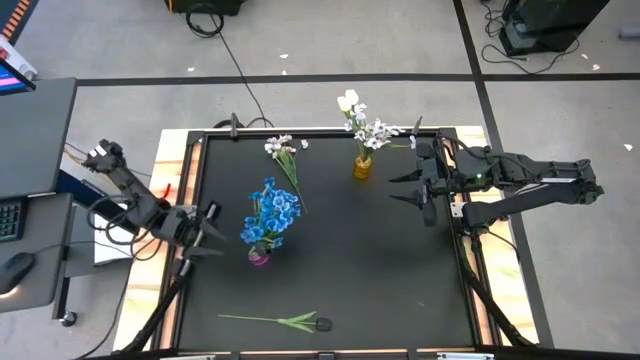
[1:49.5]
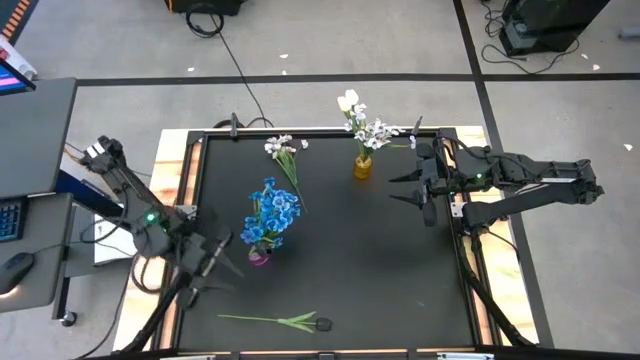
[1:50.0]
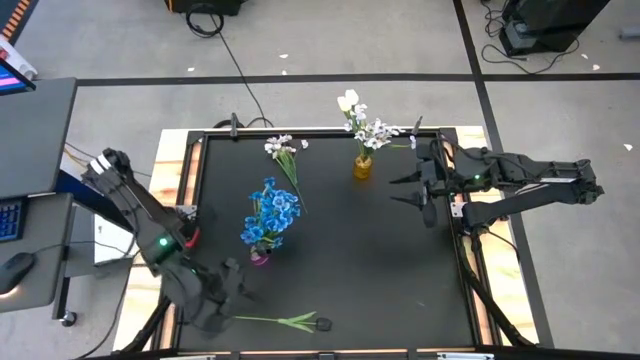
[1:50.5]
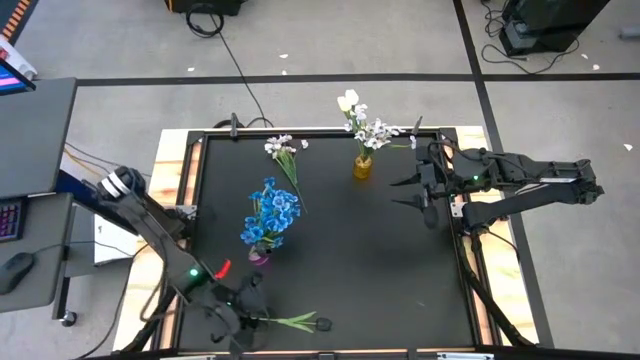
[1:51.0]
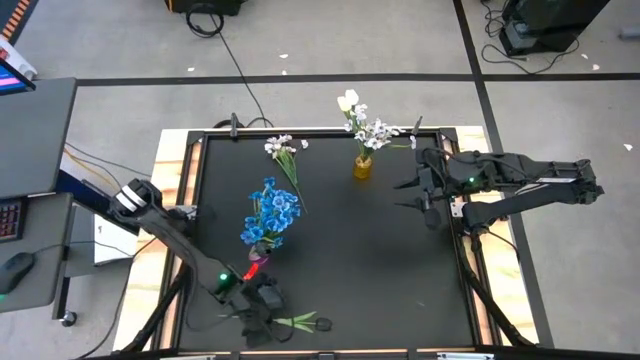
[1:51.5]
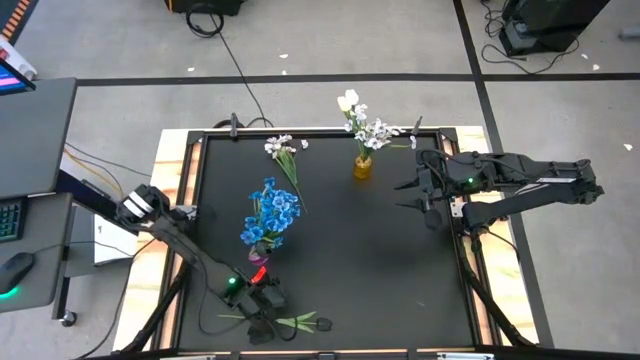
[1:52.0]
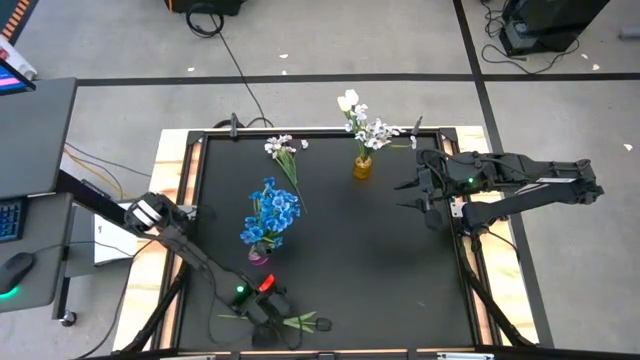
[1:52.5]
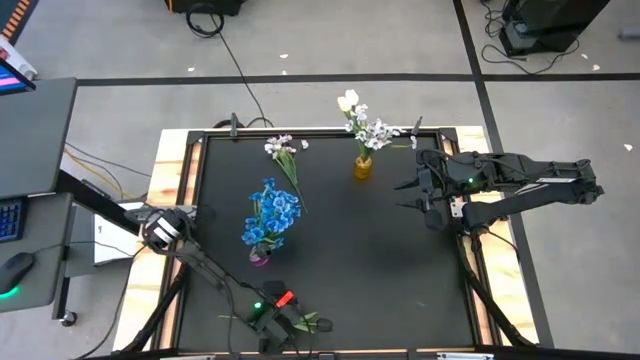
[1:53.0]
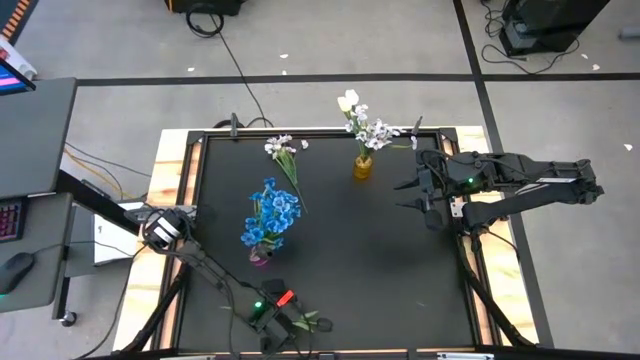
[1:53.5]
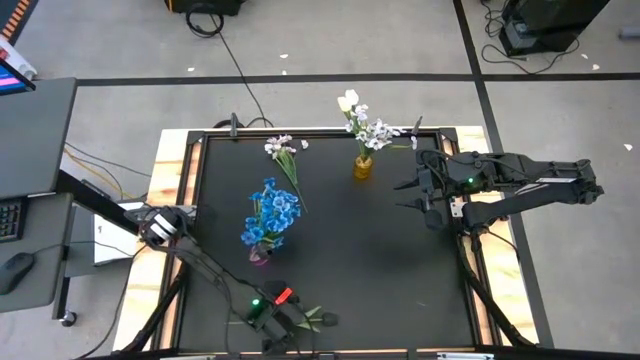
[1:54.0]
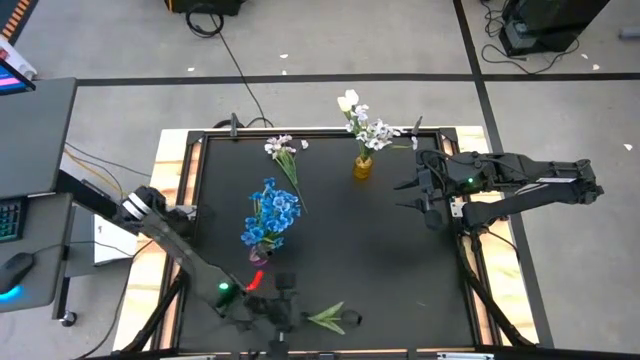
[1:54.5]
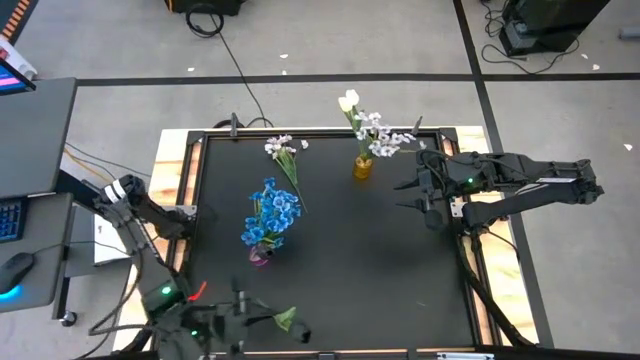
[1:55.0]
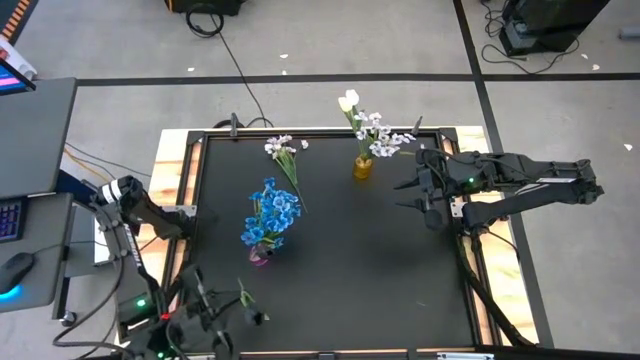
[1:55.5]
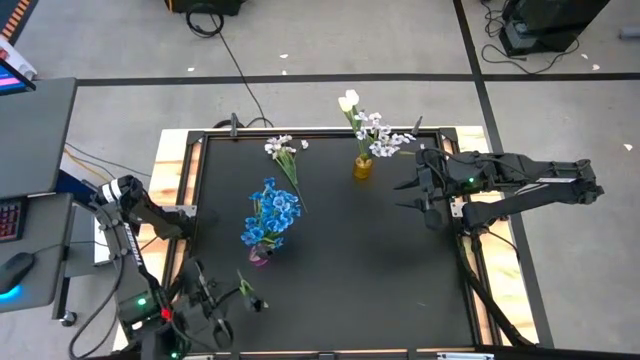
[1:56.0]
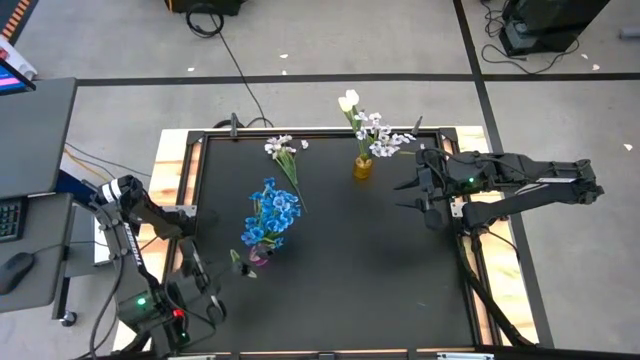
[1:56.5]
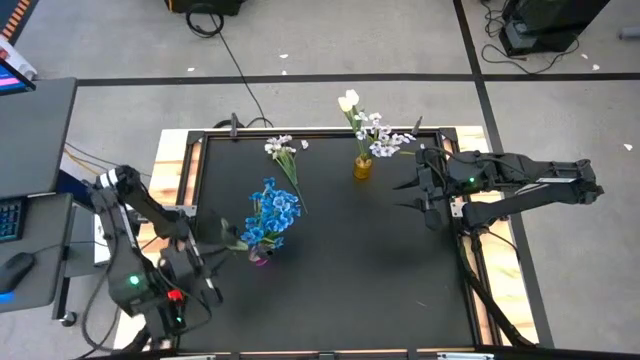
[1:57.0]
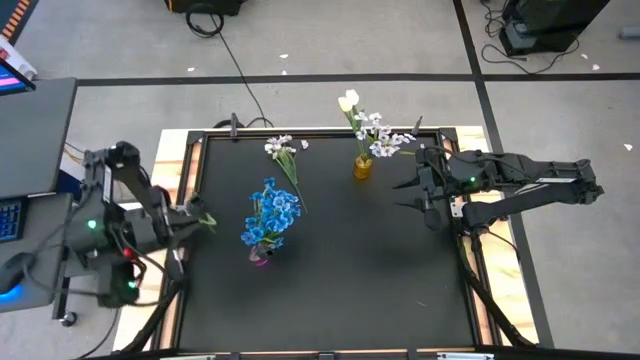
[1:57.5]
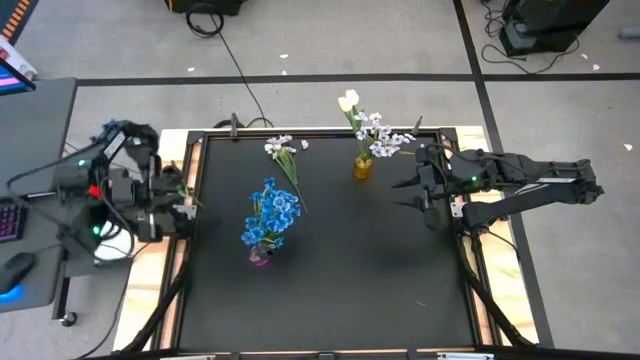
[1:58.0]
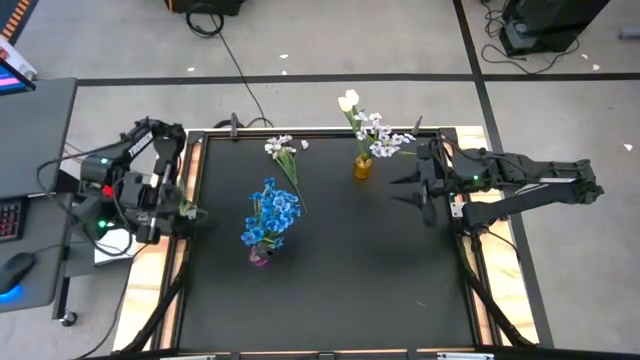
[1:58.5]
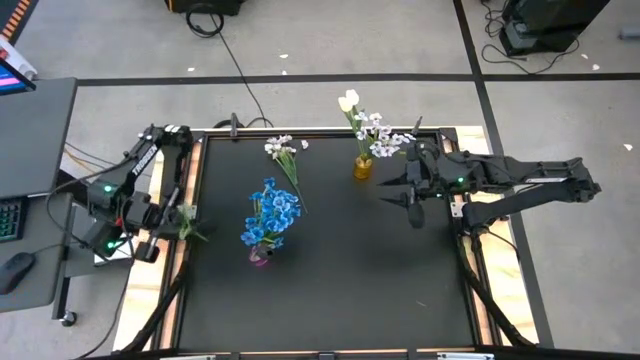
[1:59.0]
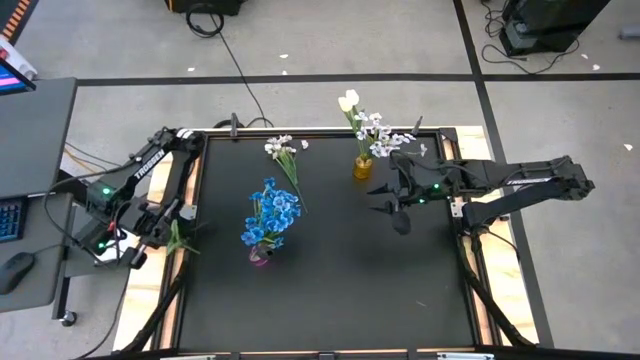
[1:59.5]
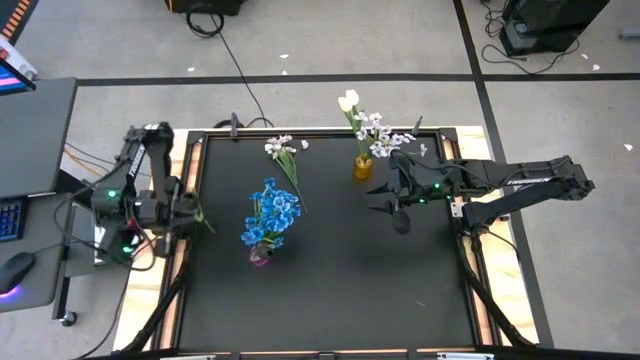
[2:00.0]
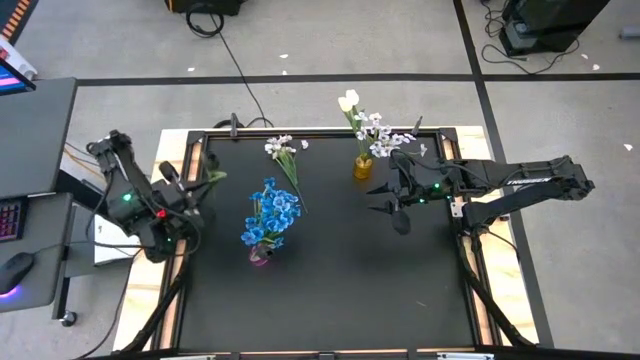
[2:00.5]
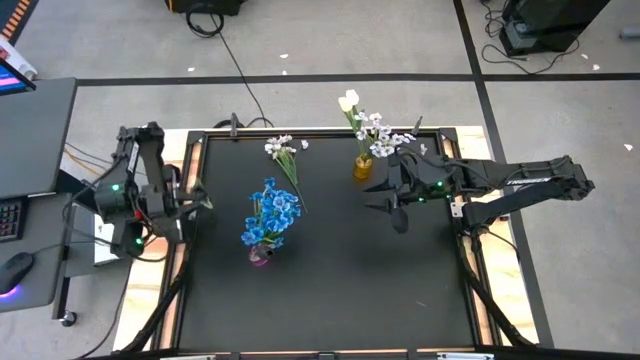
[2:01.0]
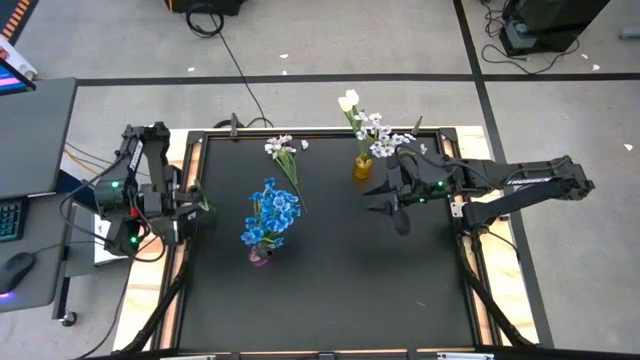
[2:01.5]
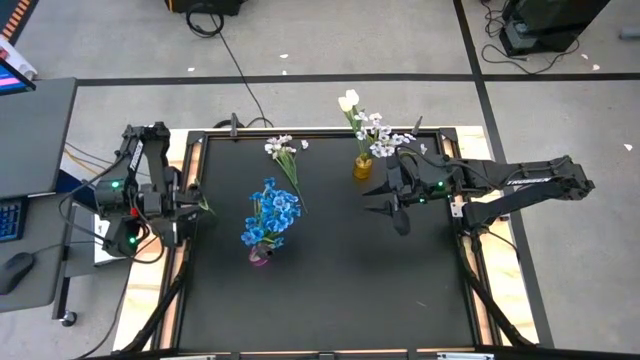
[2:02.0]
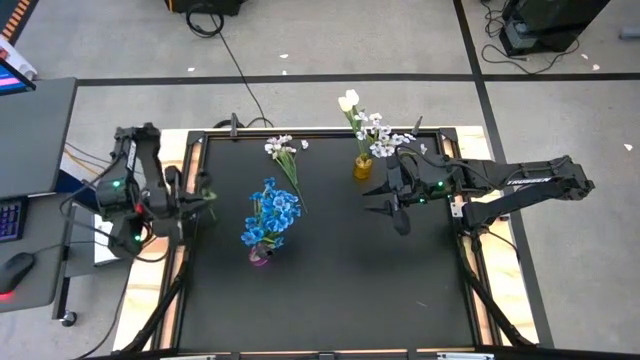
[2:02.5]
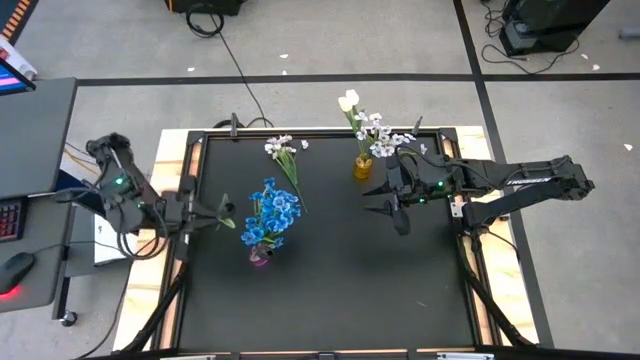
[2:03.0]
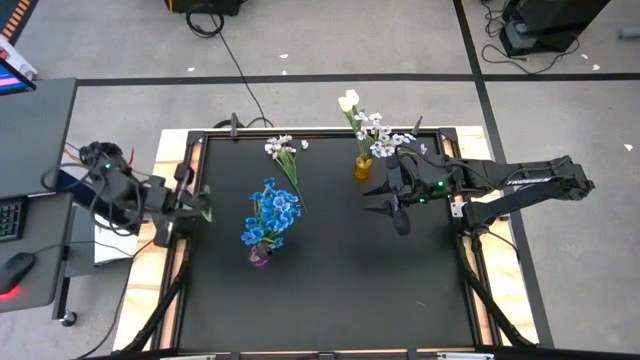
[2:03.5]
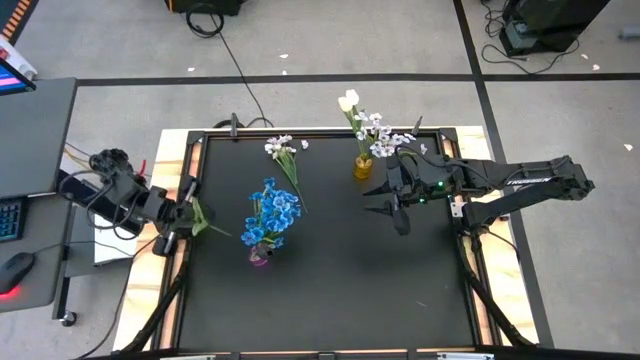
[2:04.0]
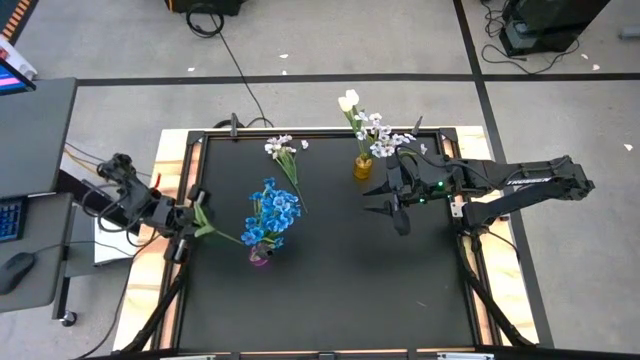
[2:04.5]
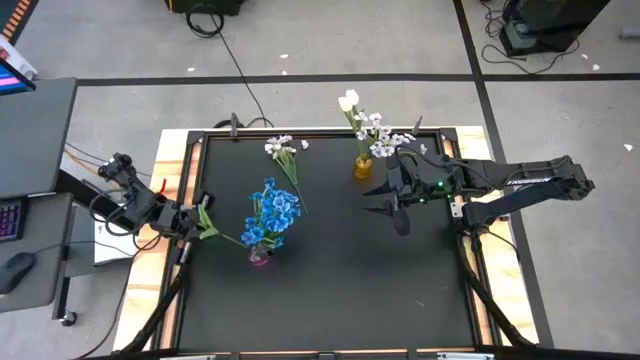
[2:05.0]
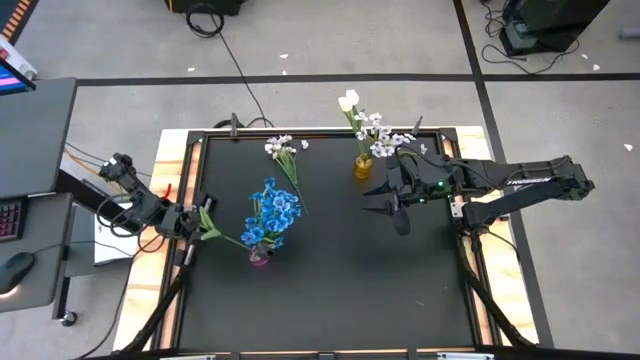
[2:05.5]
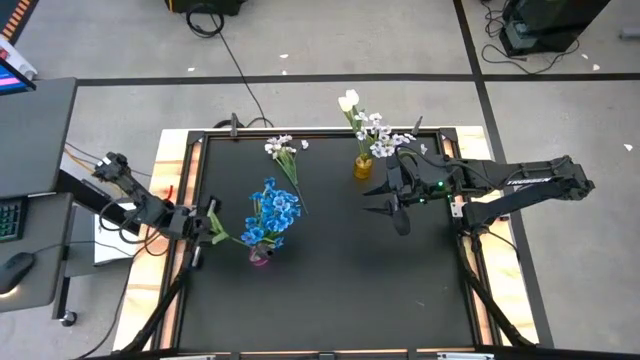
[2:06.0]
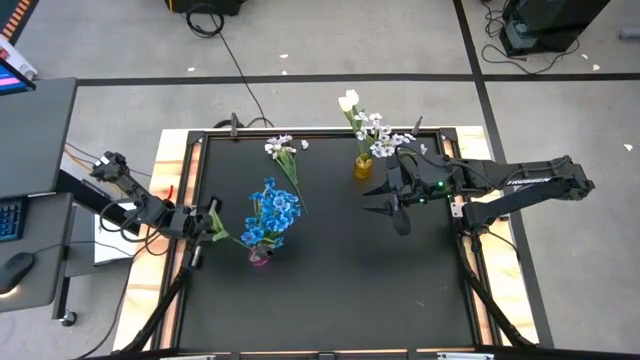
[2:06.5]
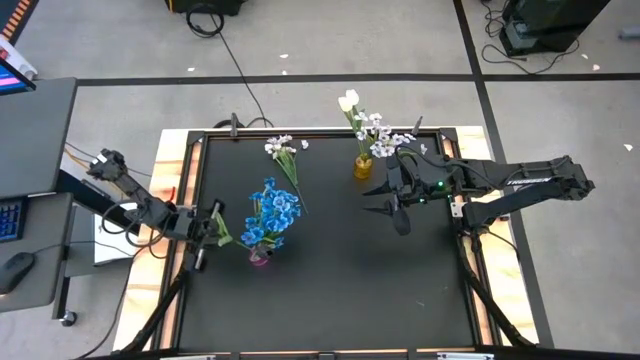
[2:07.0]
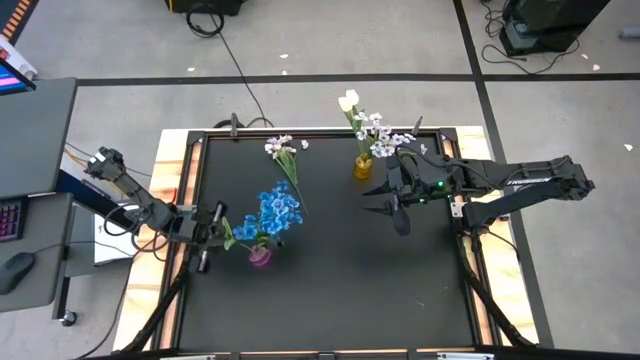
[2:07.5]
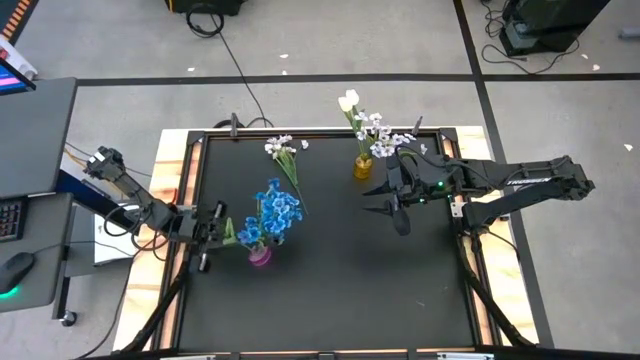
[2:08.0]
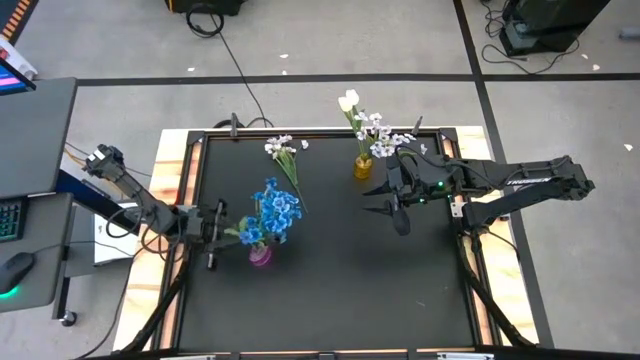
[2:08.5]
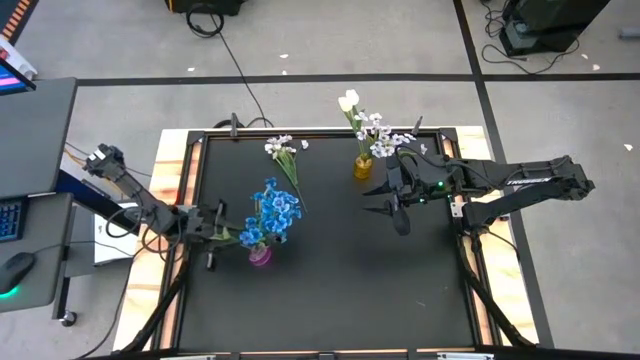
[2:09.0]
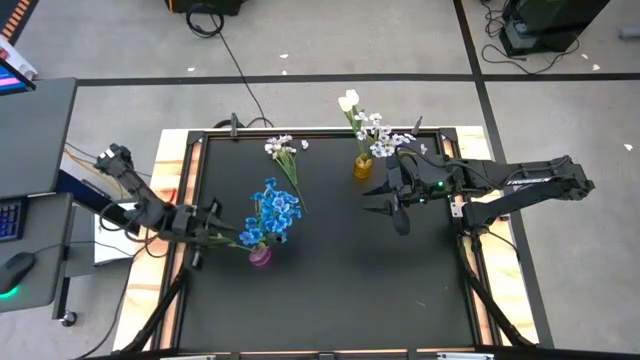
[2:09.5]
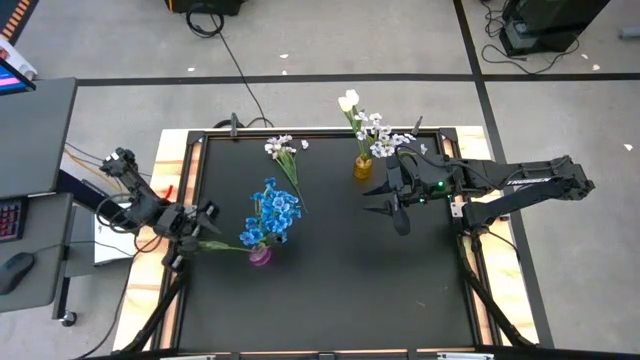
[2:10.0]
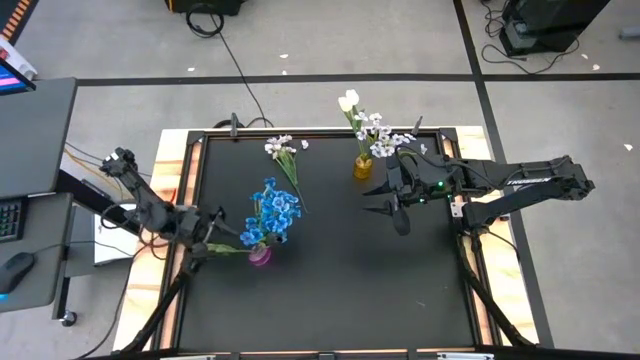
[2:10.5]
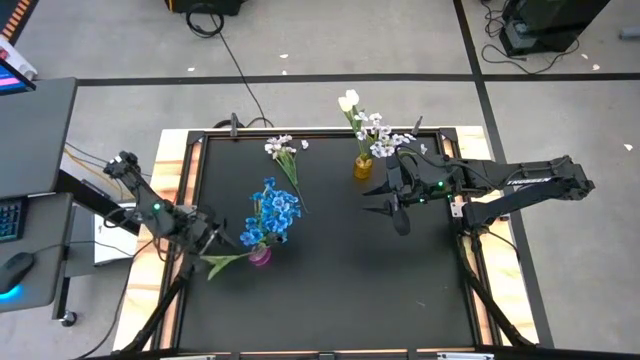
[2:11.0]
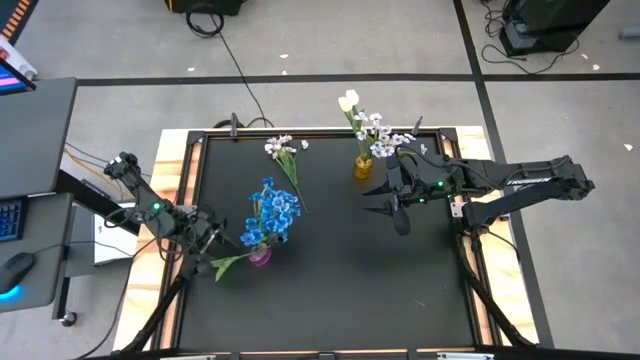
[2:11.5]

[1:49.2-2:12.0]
Task: Sort flowers into vase by color
Put the black tulip into the violet vase
